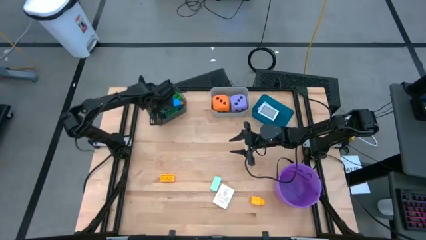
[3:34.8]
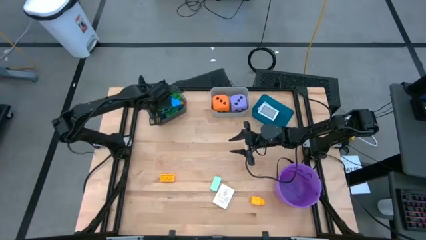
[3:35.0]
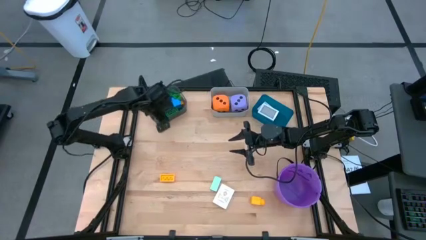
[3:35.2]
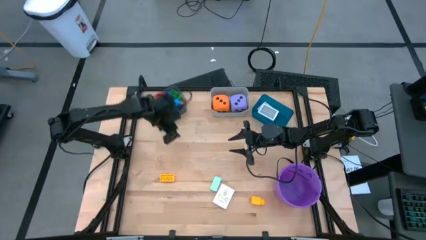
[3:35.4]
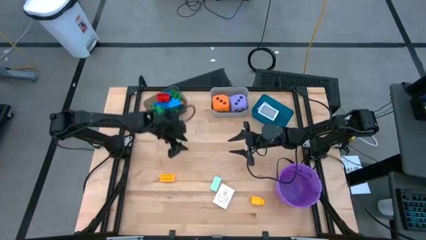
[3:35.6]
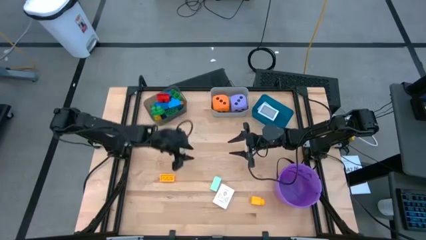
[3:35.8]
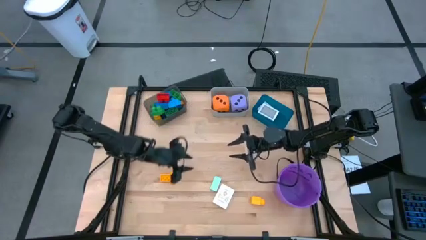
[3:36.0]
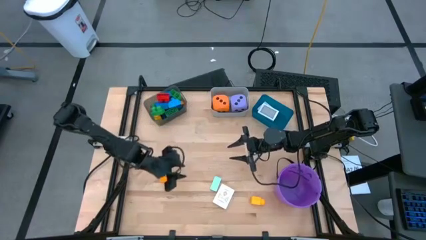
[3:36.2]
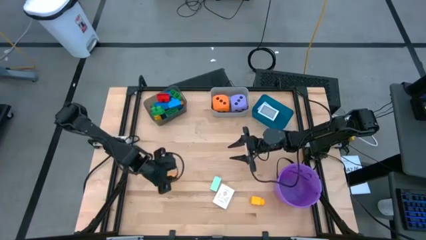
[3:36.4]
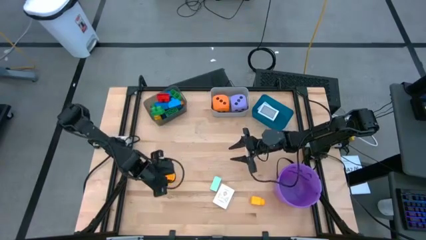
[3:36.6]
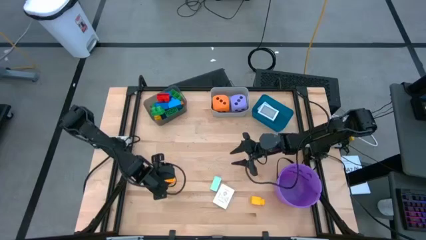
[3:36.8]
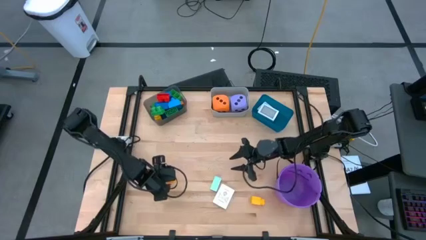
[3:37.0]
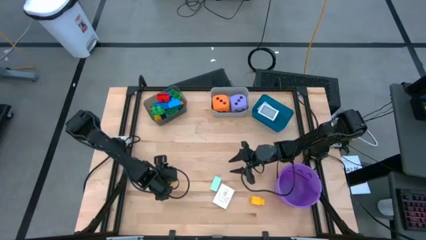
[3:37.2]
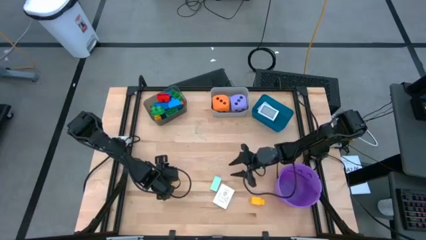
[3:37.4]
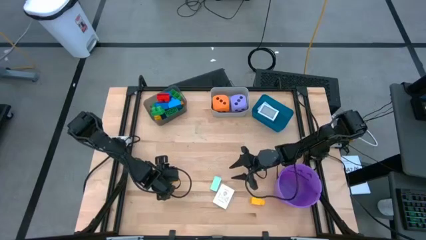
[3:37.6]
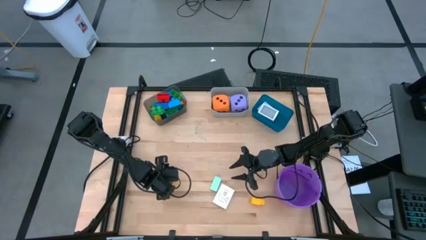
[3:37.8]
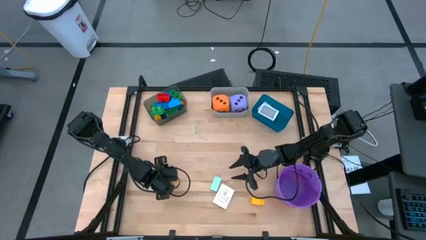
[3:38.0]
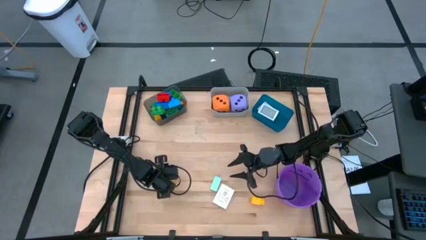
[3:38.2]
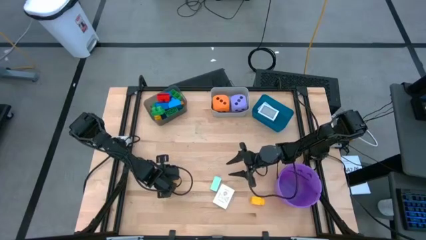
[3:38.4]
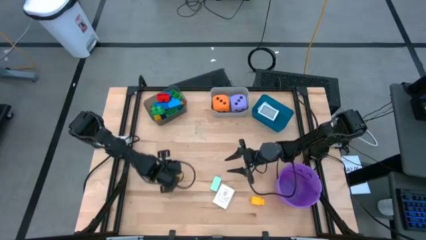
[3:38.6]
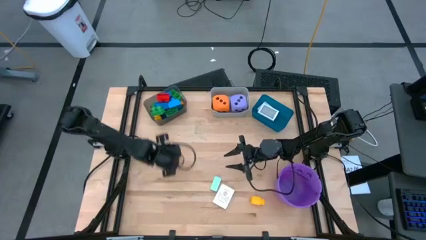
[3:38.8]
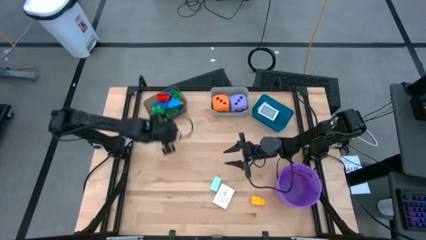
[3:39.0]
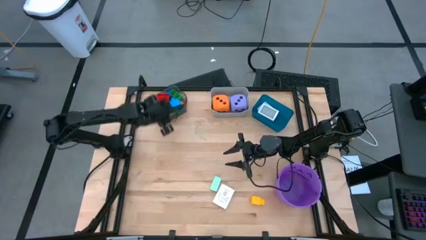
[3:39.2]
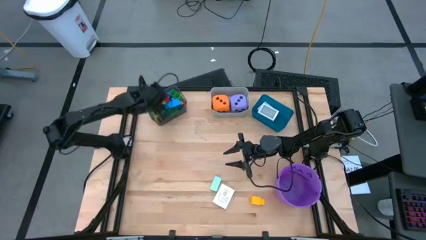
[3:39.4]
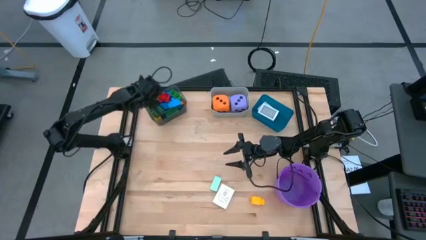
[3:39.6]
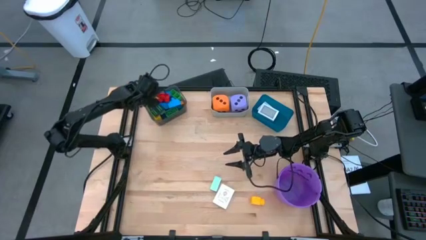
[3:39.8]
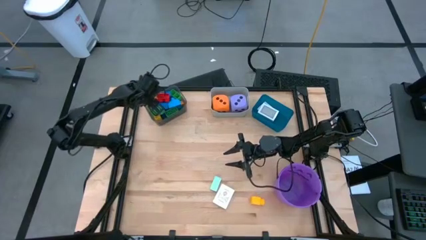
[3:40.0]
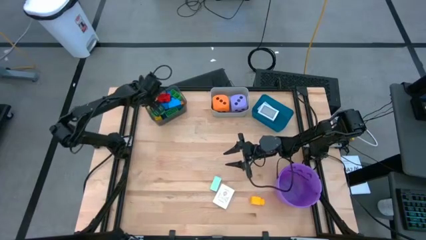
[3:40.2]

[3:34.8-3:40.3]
Task: Pick & Place Toys
Put the yellow gamepiece into the black bin

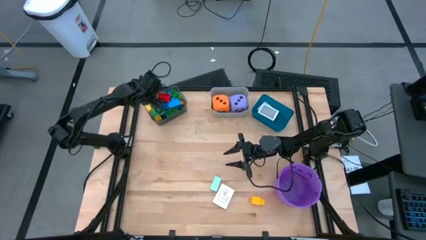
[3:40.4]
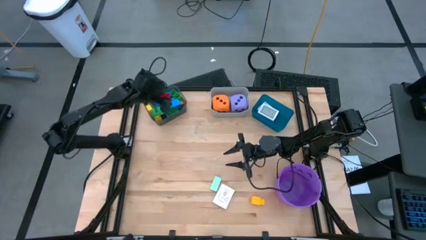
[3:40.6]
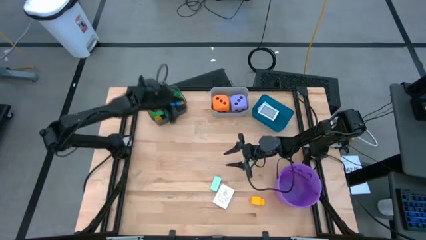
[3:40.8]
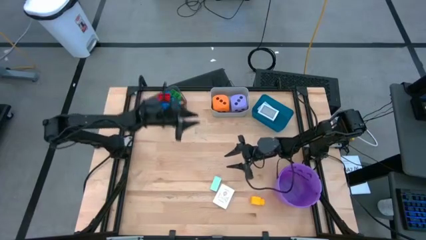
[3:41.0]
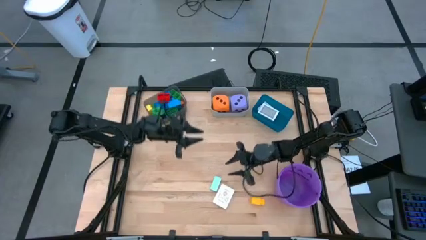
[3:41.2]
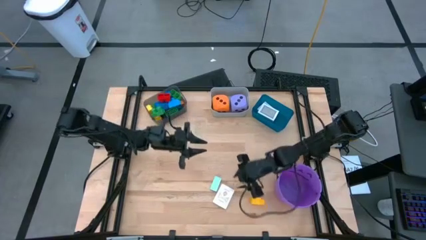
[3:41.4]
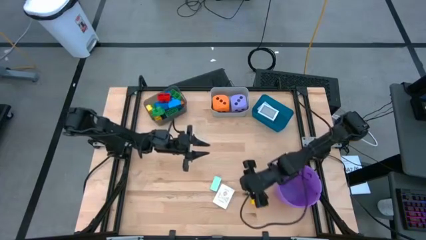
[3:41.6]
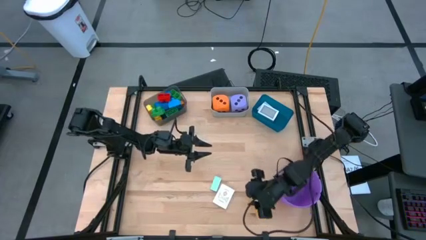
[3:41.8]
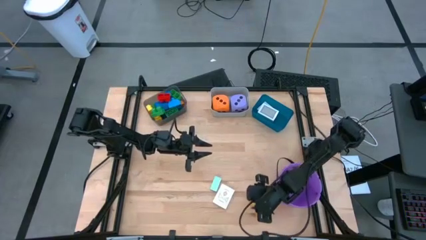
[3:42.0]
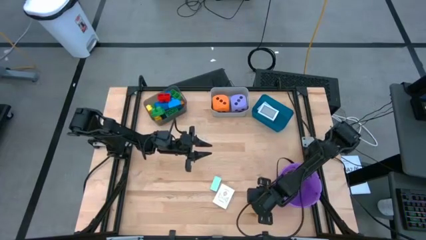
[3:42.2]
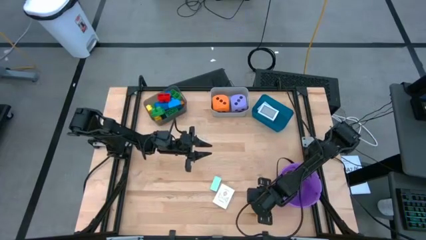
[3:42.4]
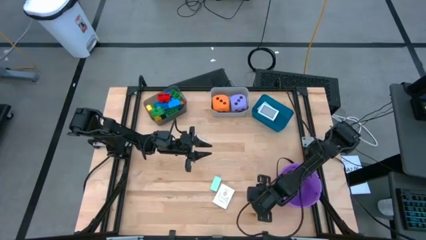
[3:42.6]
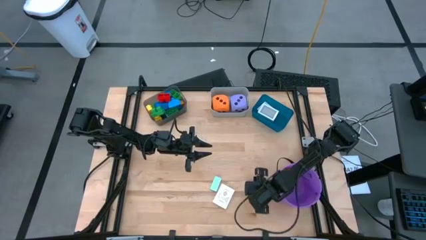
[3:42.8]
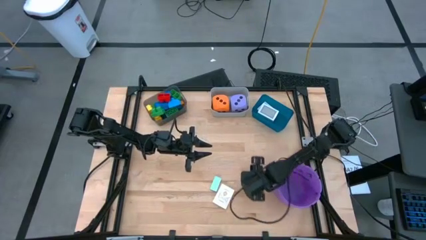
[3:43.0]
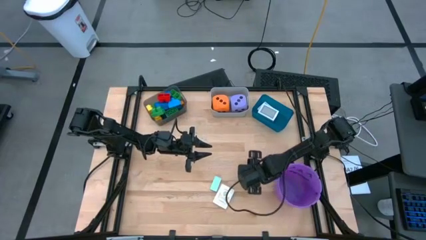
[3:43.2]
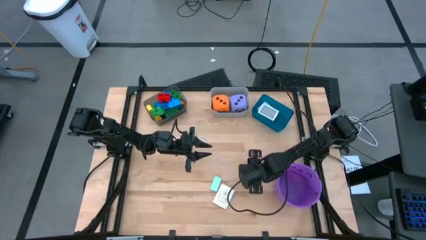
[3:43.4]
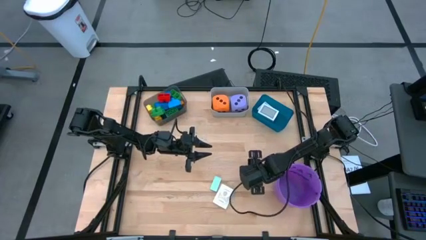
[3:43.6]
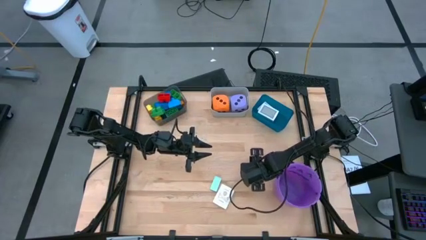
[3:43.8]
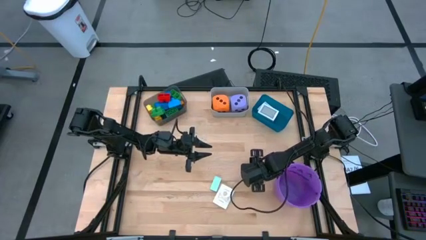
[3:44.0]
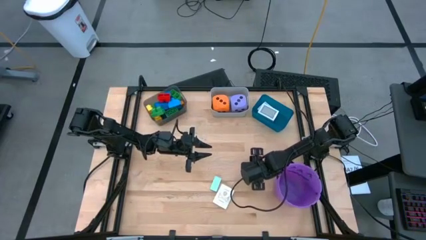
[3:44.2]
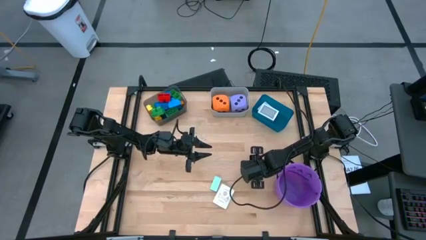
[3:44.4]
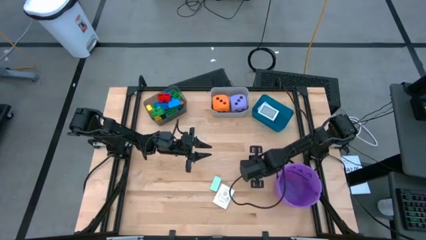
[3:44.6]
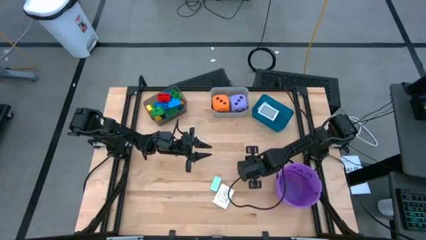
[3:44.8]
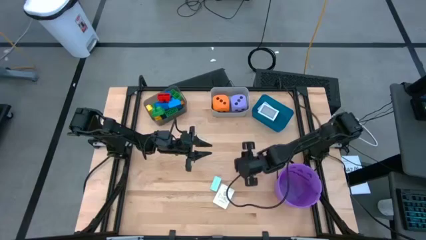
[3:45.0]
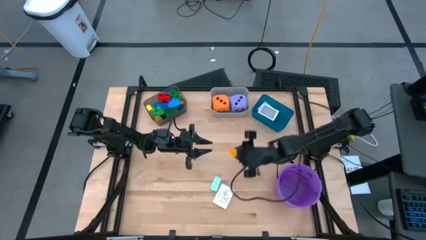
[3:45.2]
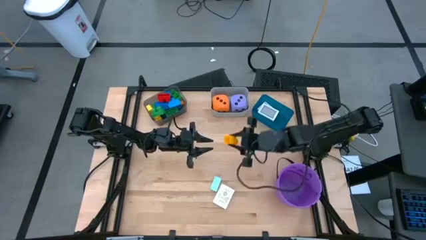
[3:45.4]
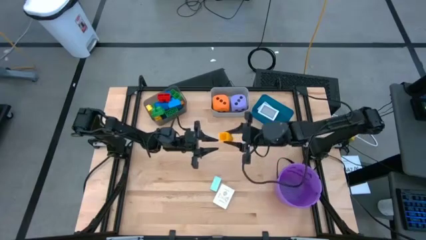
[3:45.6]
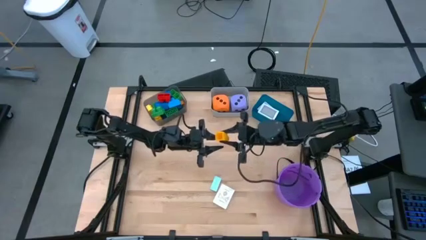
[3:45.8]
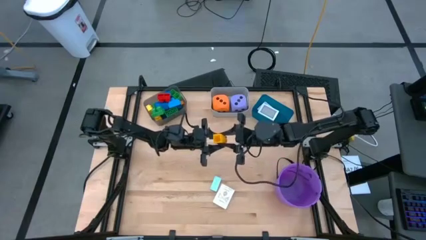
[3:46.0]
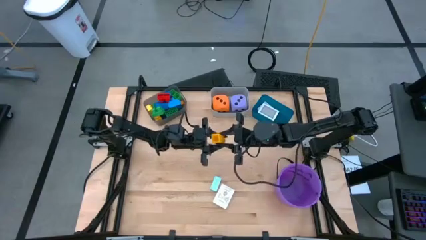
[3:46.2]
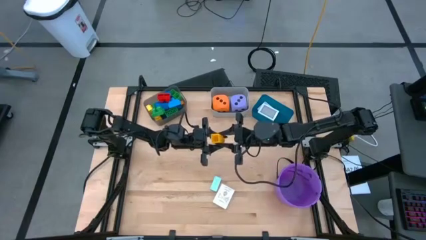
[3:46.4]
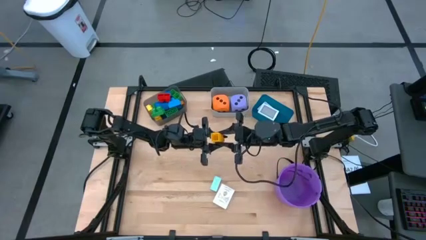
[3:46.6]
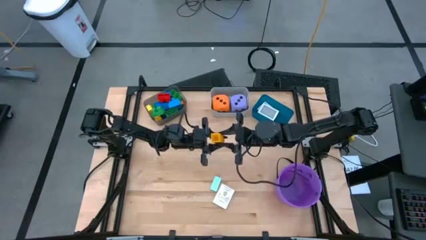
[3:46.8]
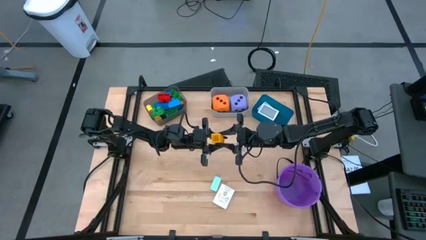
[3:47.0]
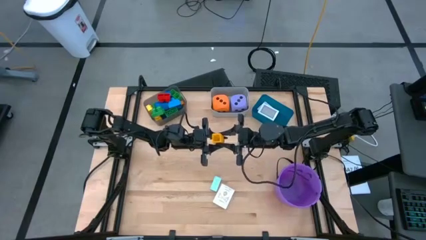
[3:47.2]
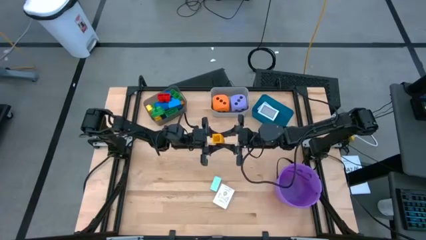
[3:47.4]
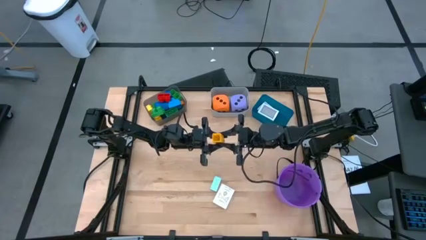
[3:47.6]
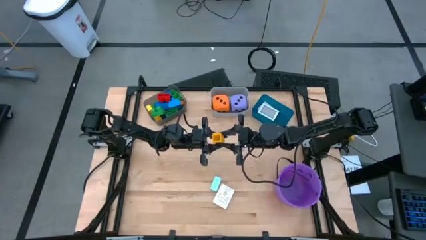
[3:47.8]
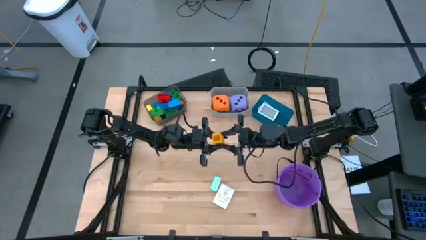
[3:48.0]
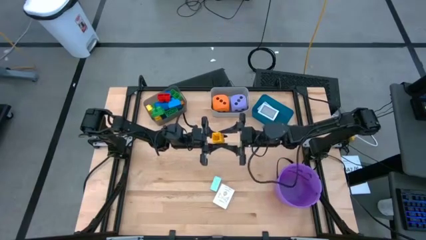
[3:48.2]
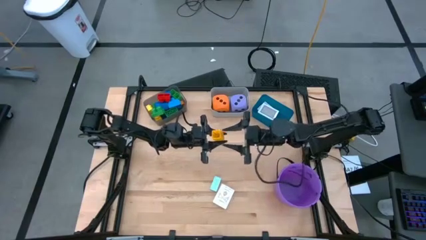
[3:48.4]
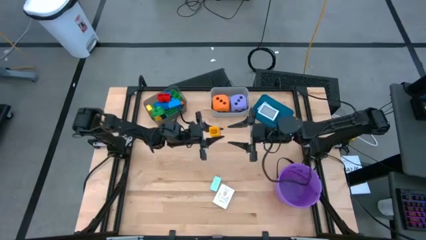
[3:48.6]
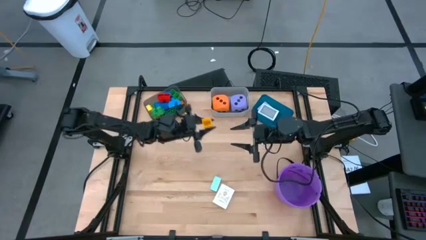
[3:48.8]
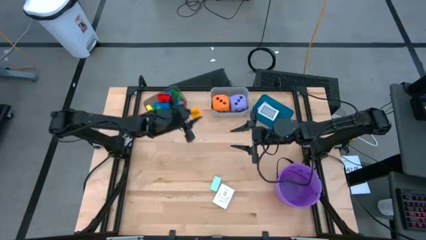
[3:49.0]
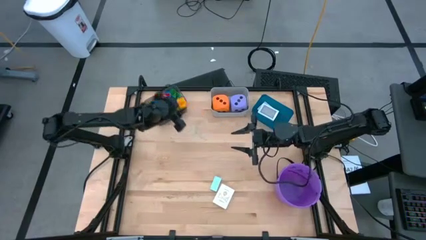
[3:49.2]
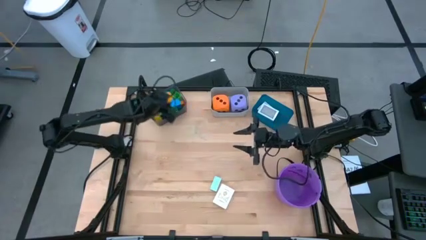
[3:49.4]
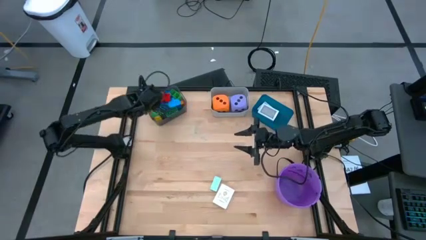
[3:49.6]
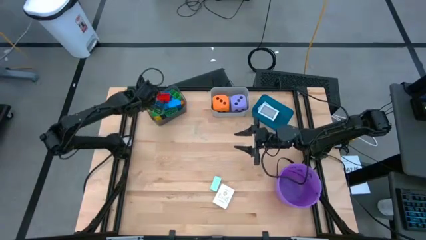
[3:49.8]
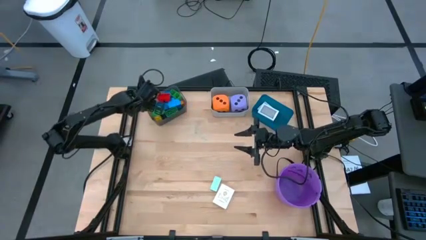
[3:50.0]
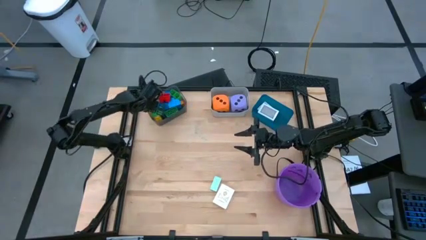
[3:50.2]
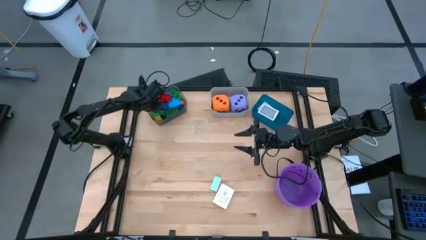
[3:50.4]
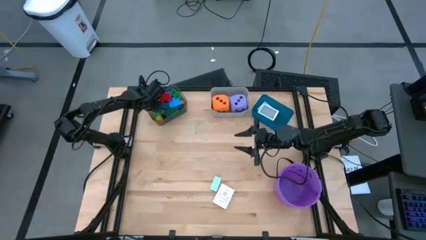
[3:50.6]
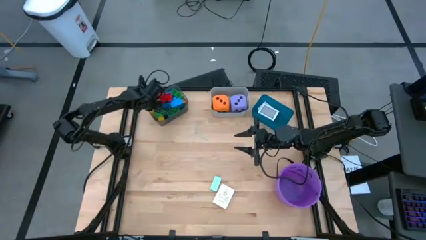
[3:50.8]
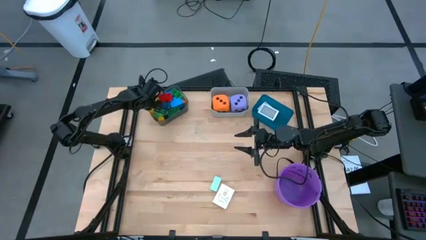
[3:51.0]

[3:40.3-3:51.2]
Put the yellow gamepiece into the black bin
